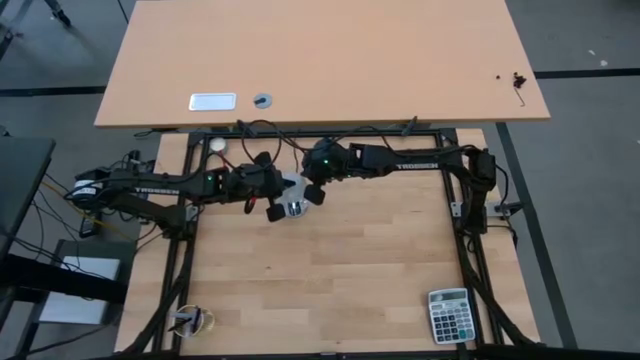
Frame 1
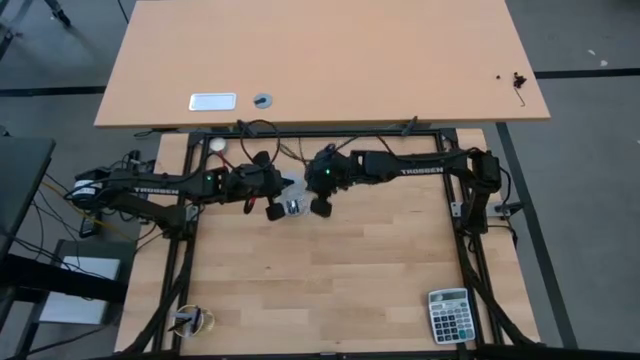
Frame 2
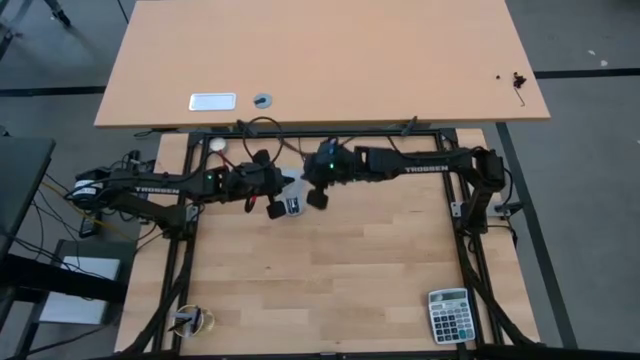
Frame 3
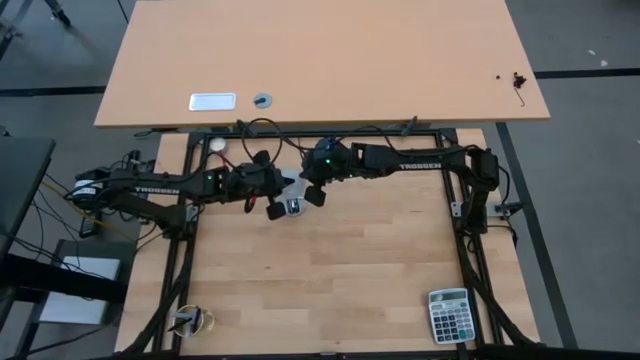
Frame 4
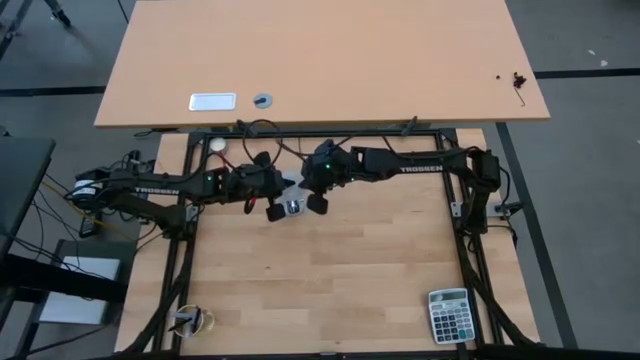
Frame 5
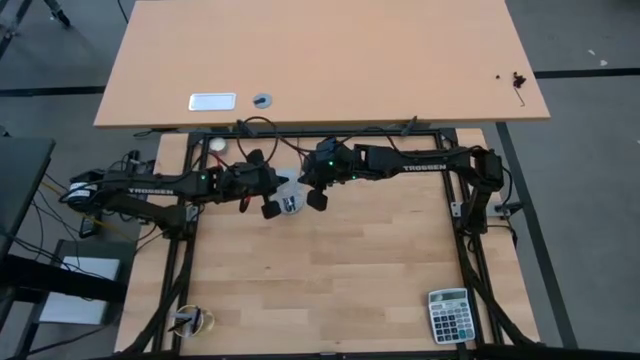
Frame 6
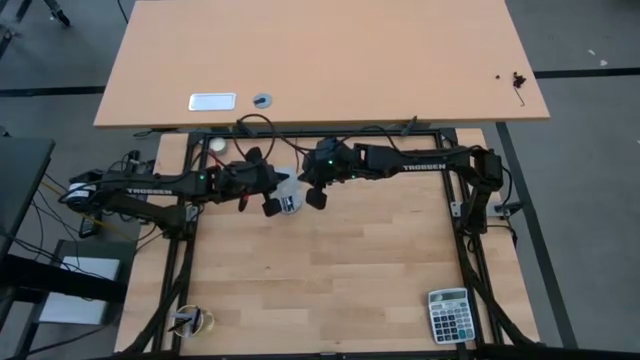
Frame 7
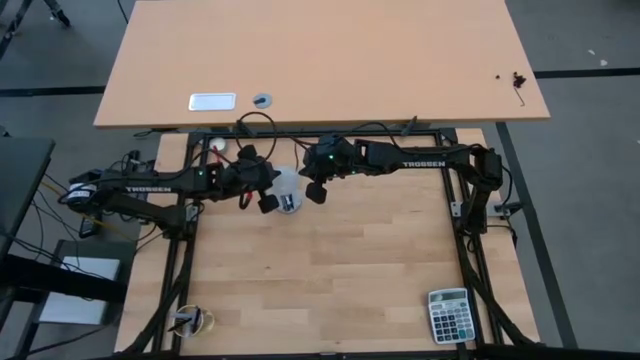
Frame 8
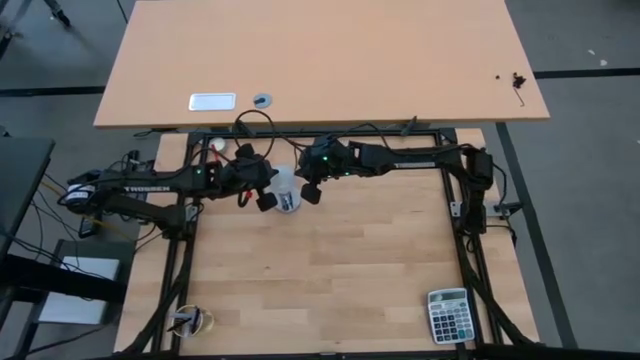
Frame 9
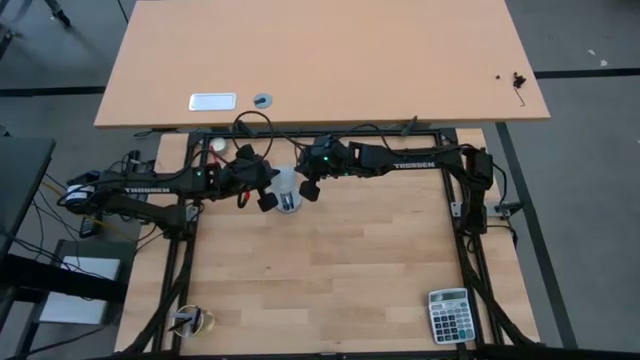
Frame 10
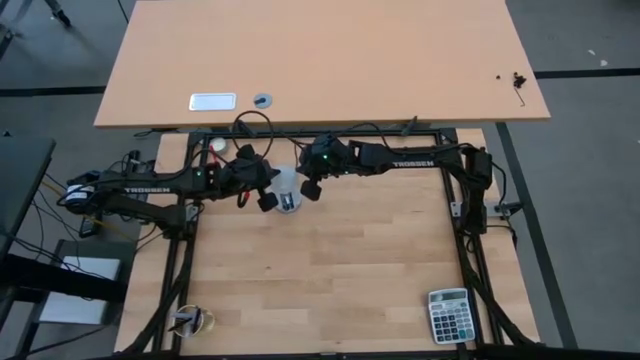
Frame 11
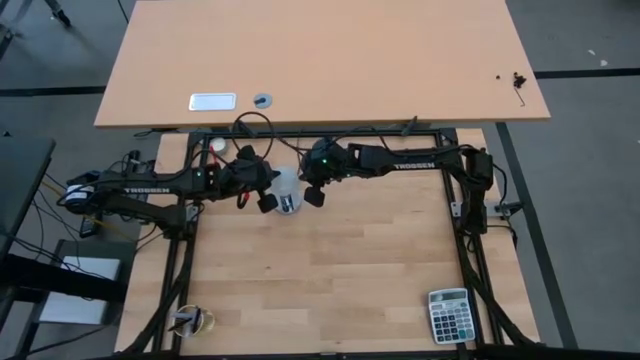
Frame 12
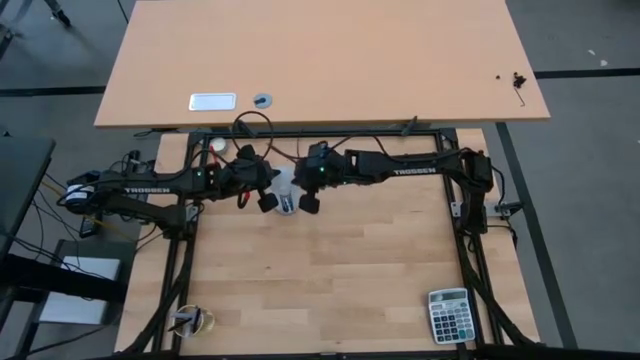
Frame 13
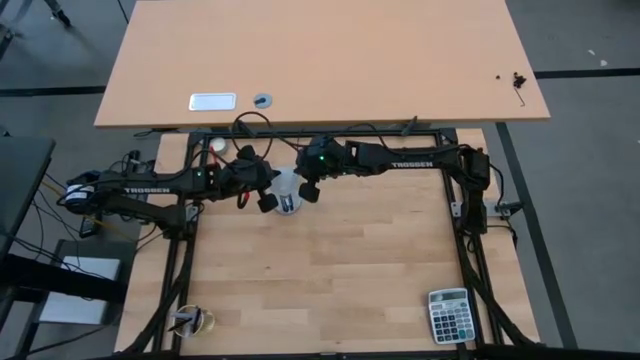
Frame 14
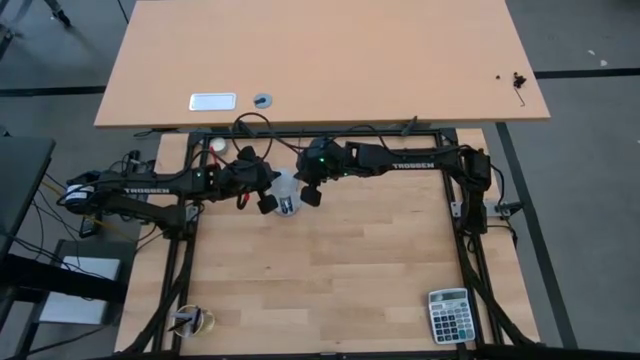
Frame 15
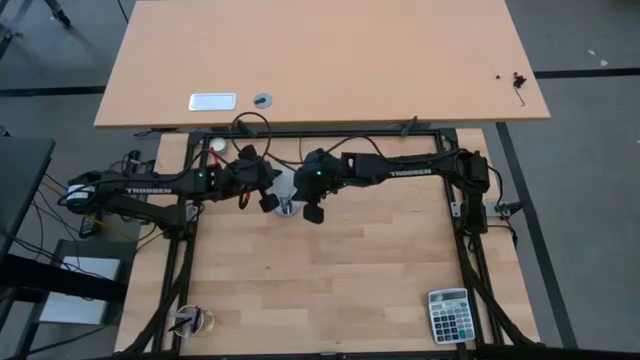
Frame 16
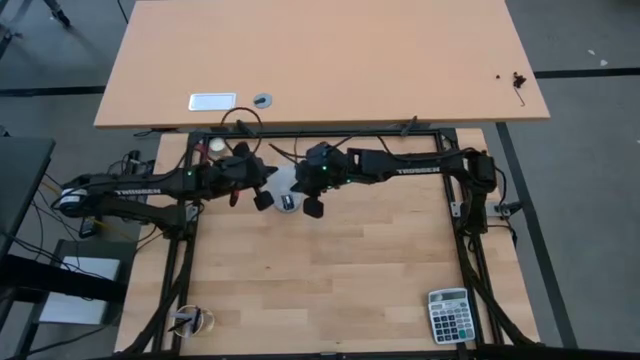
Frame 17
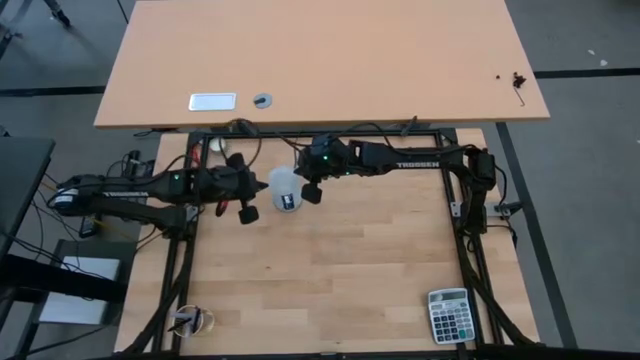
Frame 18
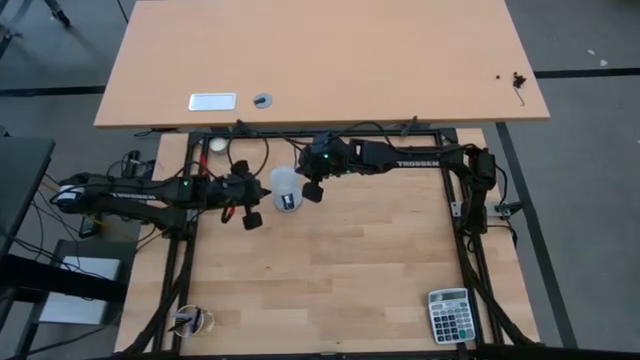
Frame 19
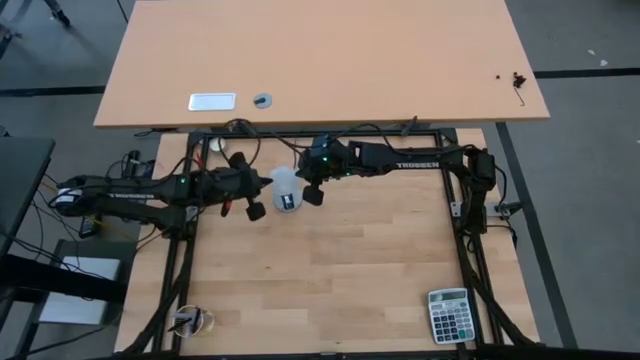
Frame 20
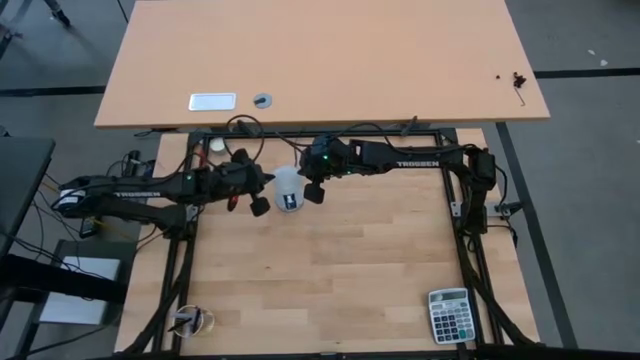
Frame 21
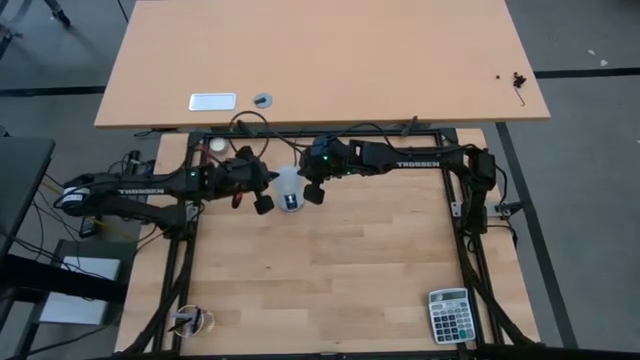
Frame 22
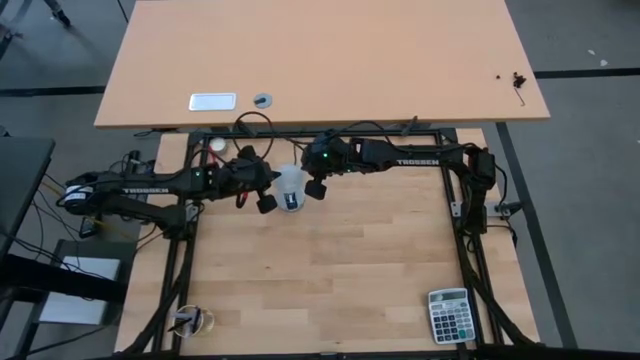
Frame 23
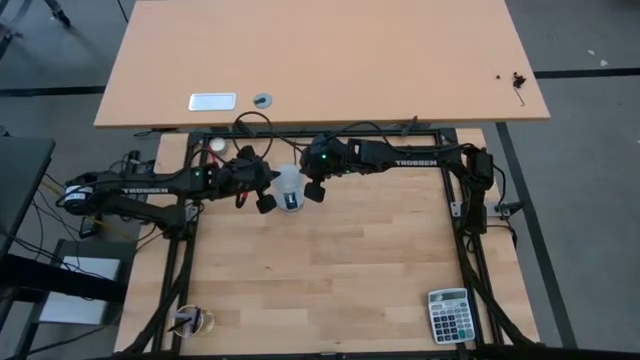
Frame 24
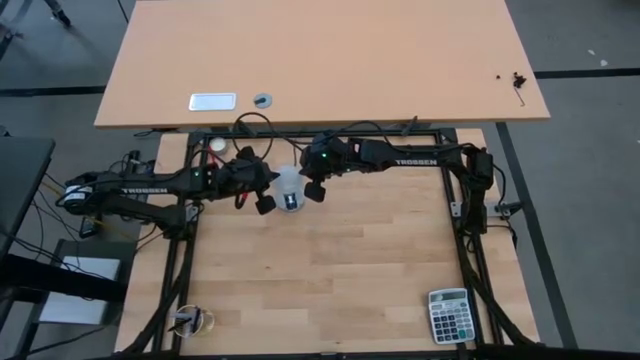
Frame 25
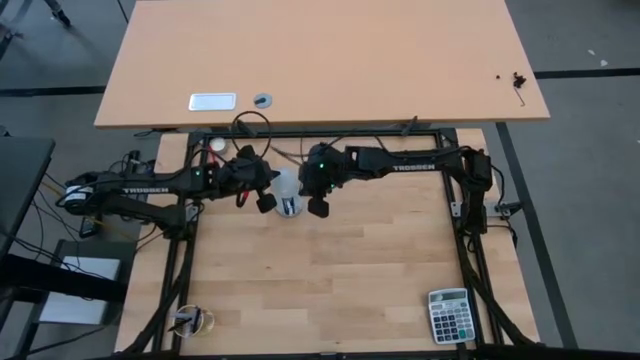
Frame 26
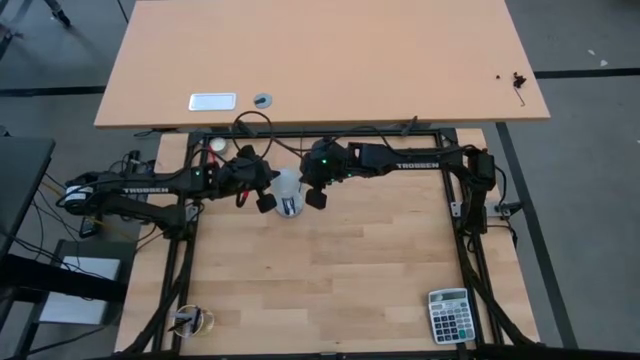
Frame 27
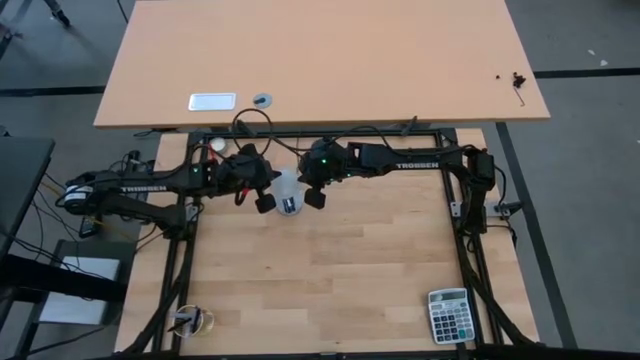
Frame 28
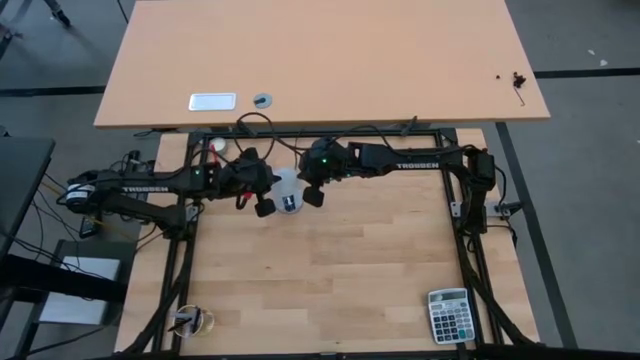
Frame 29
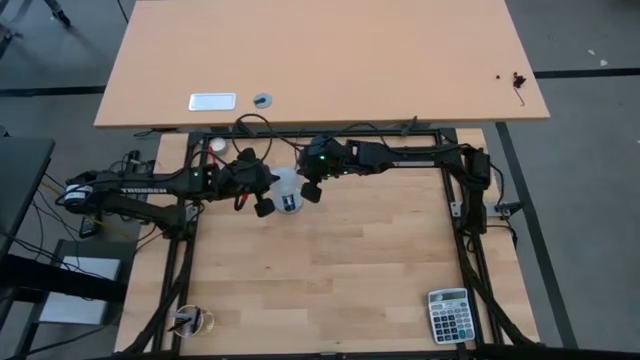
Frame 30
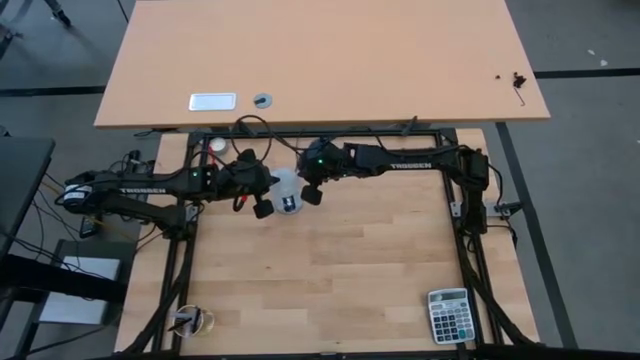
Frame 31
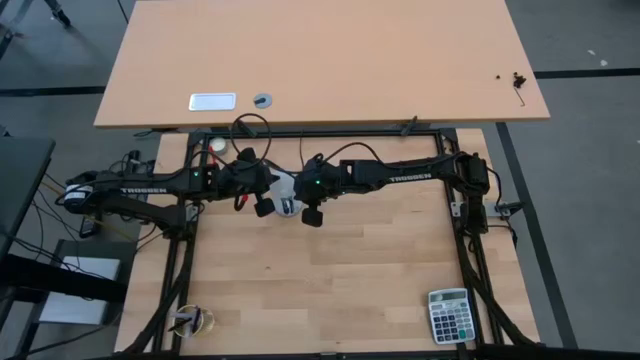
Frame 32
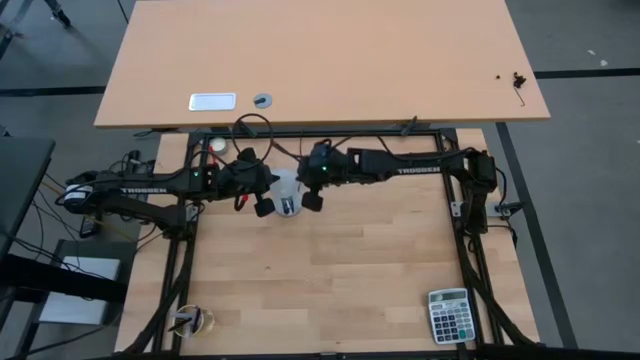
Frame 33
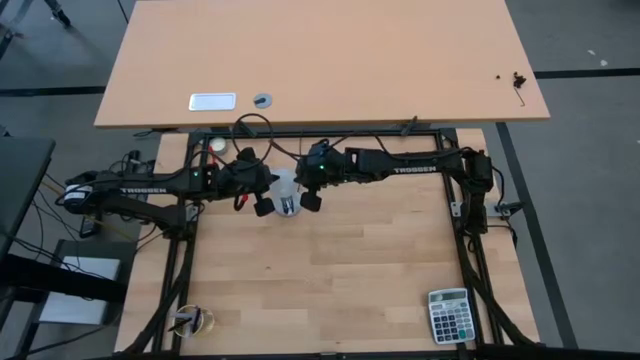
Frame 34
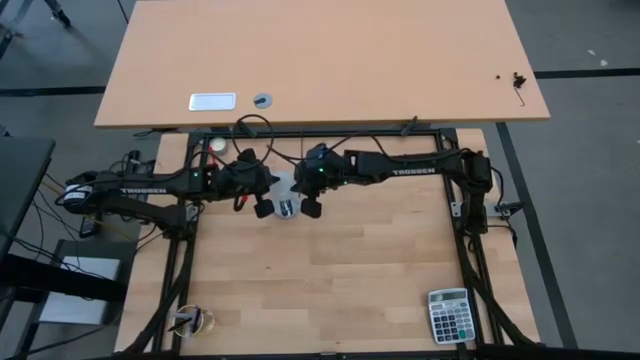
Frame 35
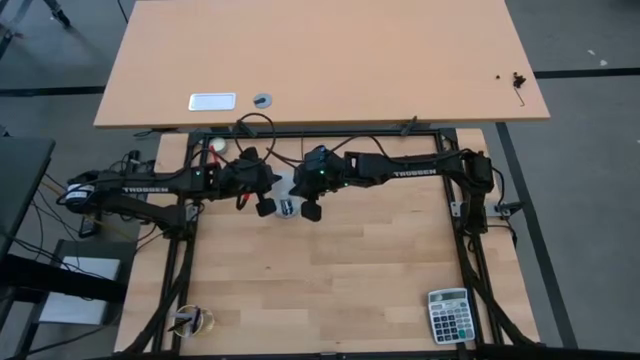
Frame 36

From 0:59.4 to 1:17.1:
Task: Screw lightbulb
Insert the white light bulb into the silver lamp

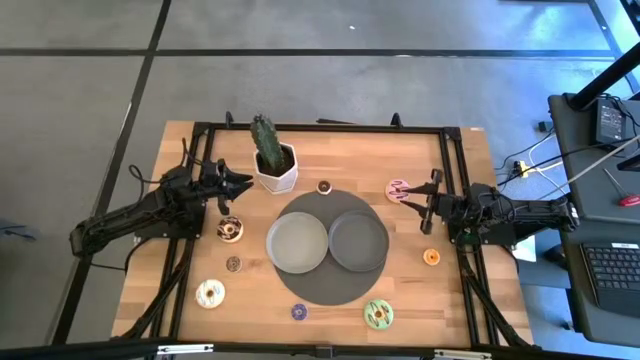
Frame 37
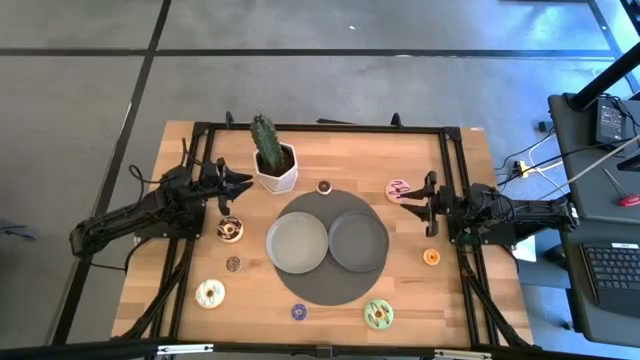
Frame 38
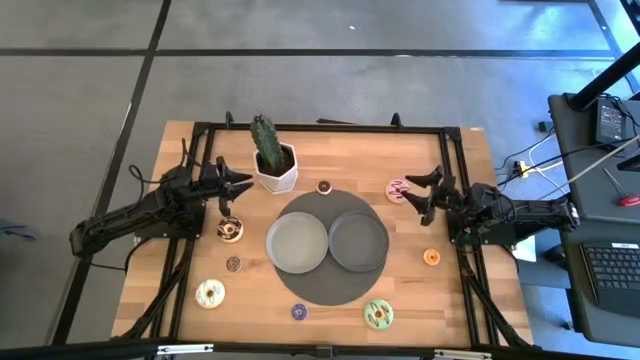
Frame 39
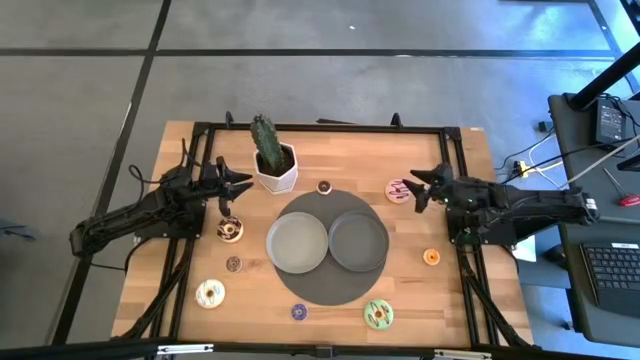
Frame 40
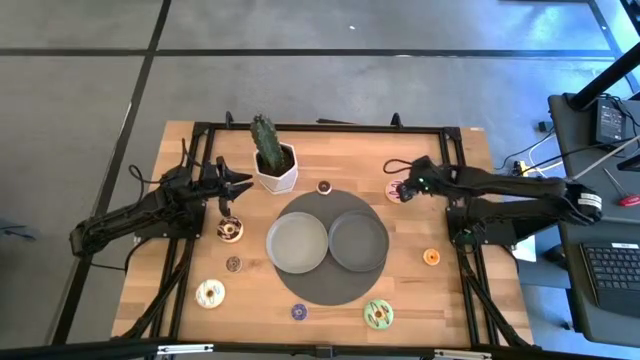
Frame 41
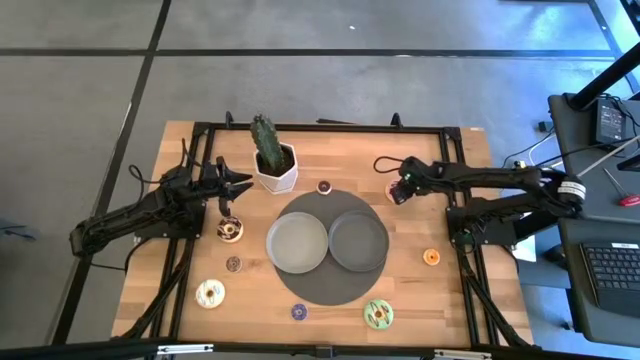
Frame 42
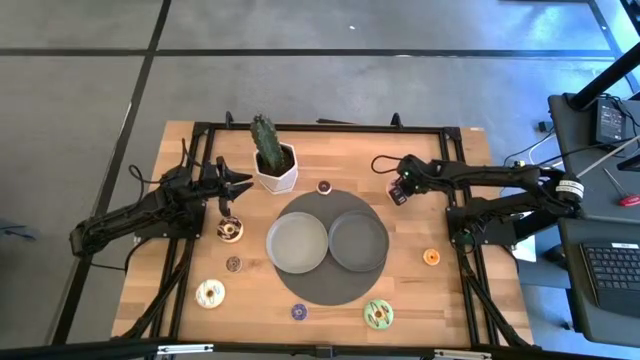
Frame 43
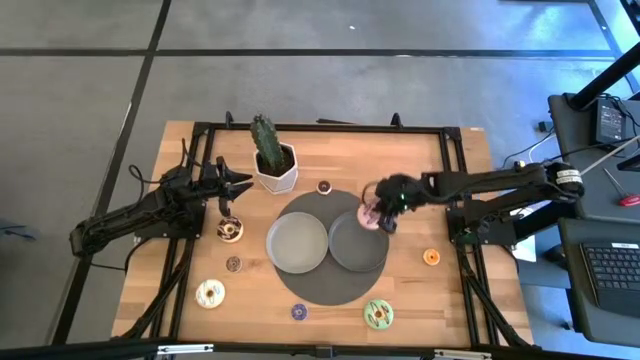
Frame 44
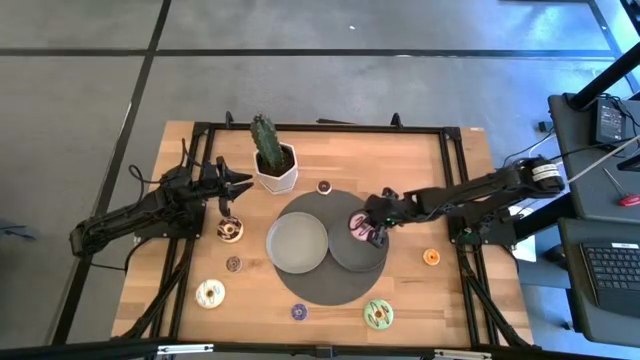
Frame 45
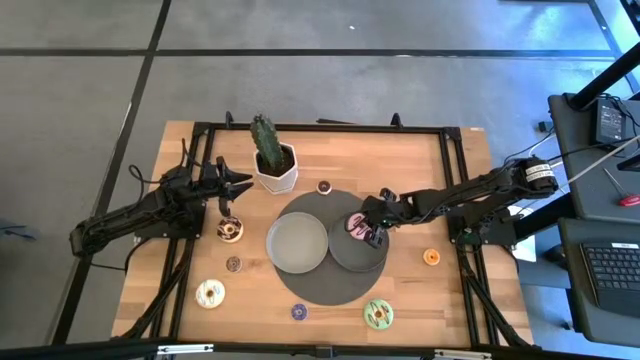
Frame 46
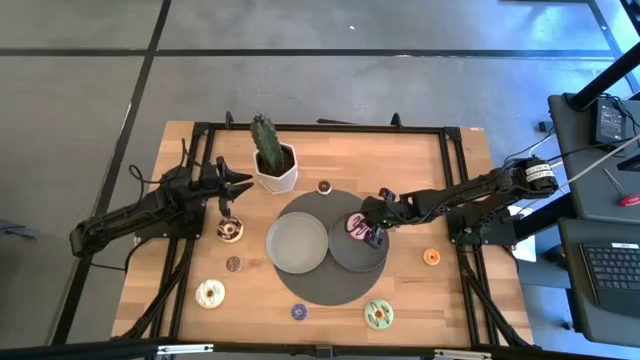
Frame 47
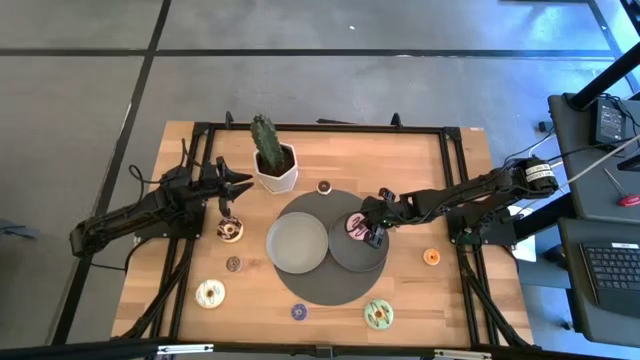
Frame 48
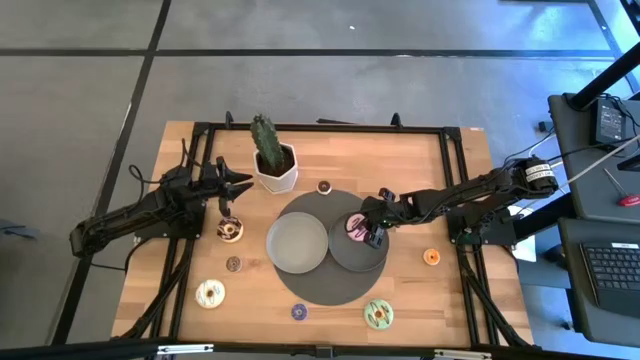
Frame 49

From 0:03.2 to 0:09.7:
Task: Pick & Place donuts
Put the large pink donut on the dark gray plate
